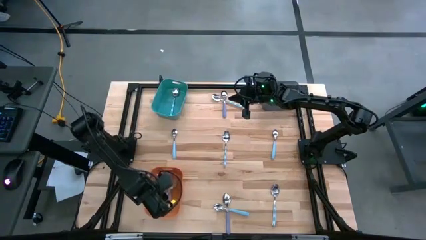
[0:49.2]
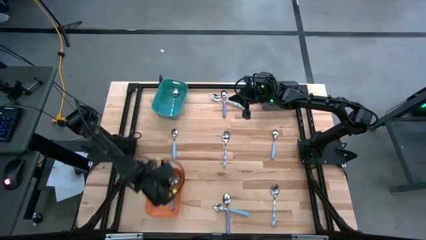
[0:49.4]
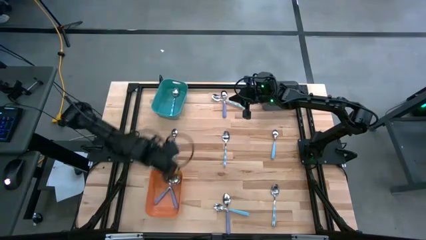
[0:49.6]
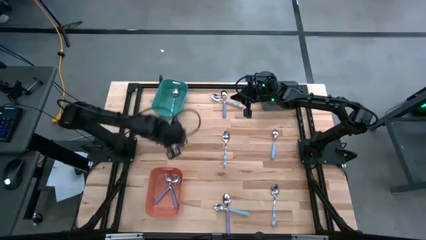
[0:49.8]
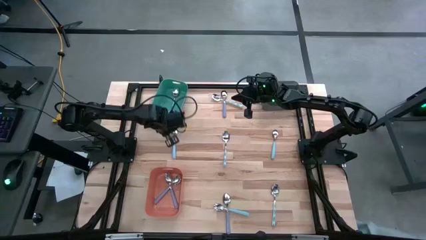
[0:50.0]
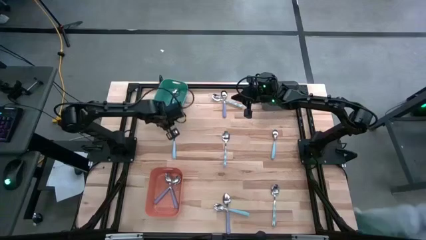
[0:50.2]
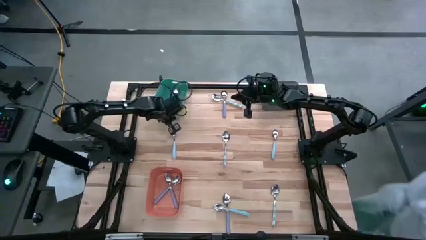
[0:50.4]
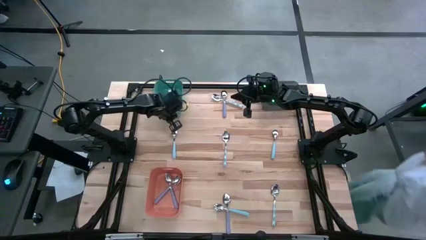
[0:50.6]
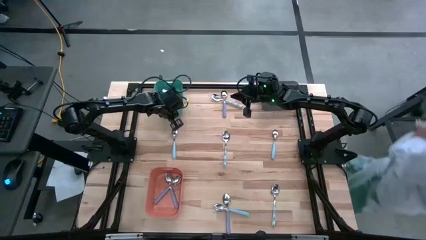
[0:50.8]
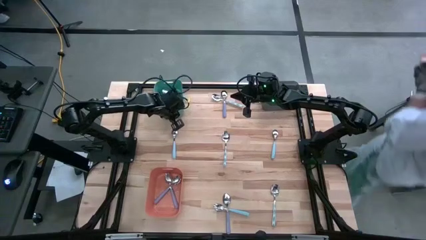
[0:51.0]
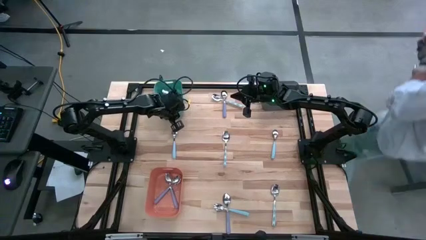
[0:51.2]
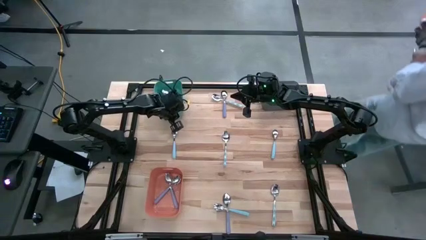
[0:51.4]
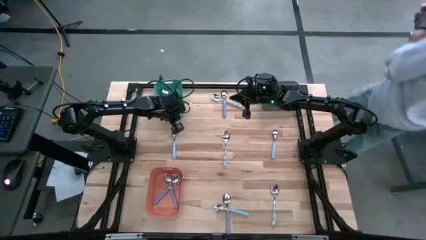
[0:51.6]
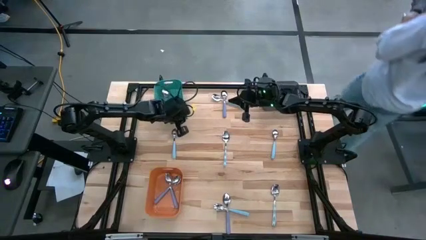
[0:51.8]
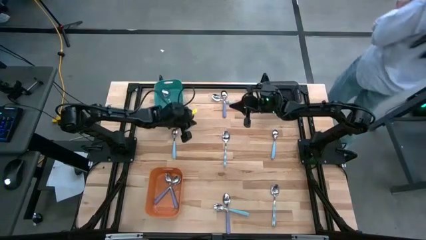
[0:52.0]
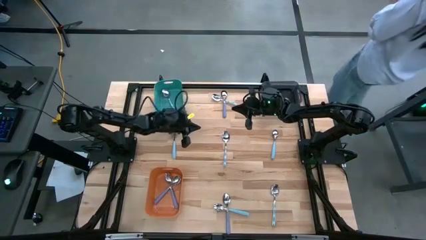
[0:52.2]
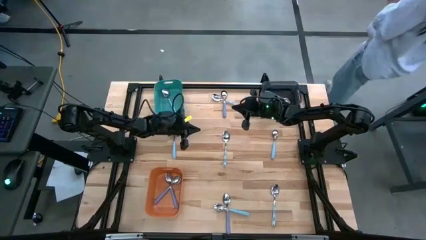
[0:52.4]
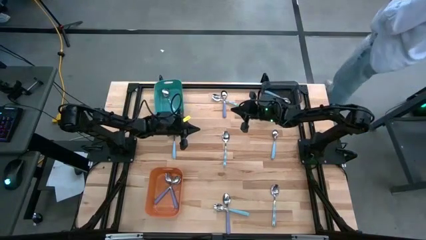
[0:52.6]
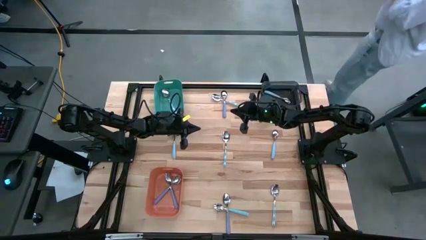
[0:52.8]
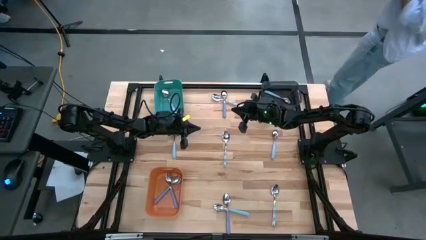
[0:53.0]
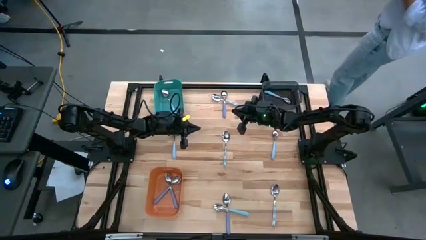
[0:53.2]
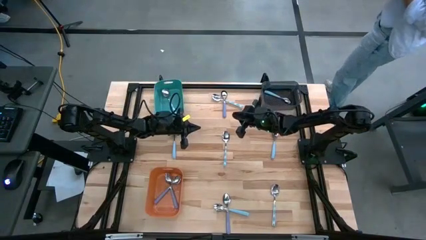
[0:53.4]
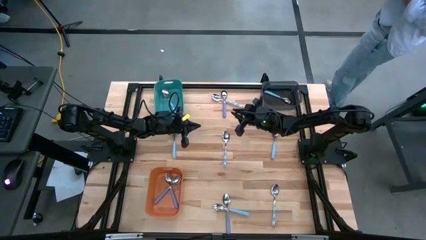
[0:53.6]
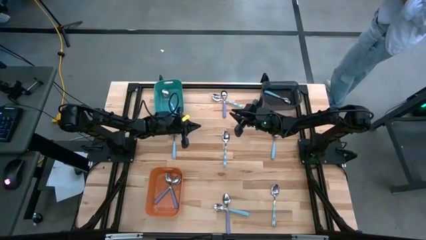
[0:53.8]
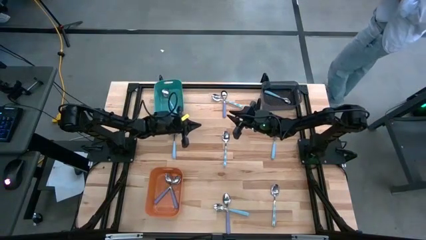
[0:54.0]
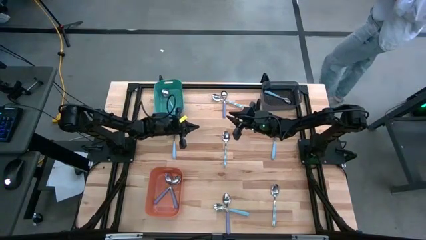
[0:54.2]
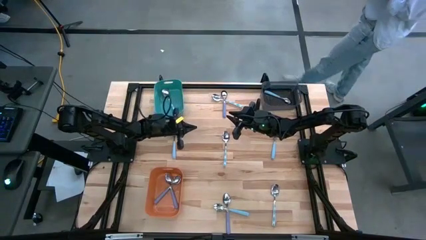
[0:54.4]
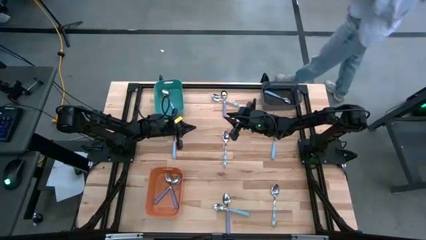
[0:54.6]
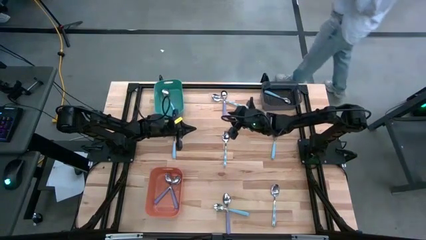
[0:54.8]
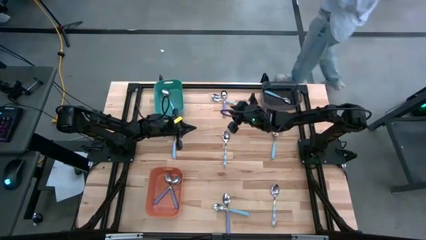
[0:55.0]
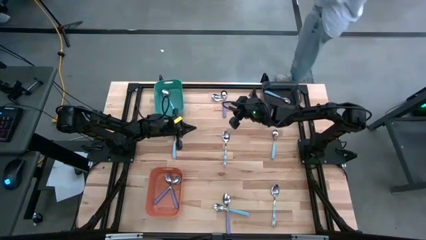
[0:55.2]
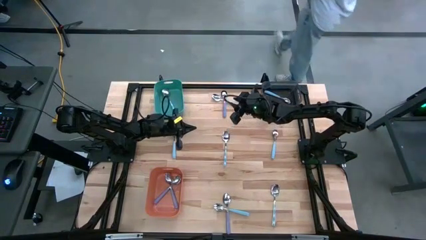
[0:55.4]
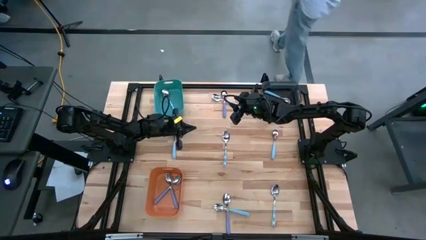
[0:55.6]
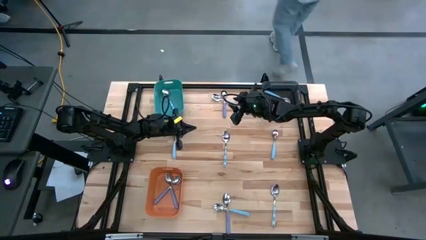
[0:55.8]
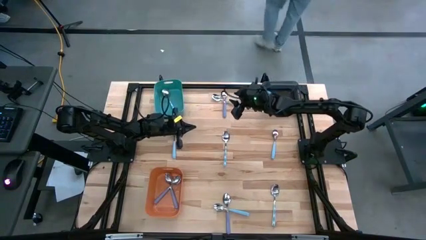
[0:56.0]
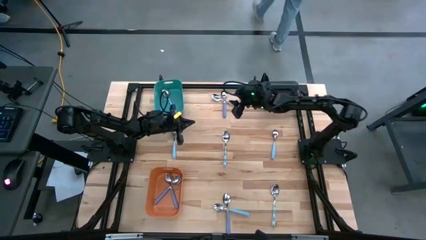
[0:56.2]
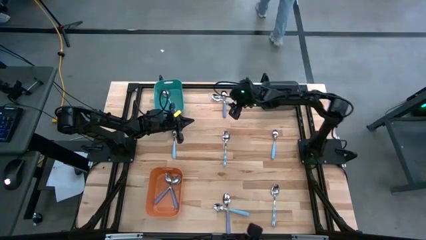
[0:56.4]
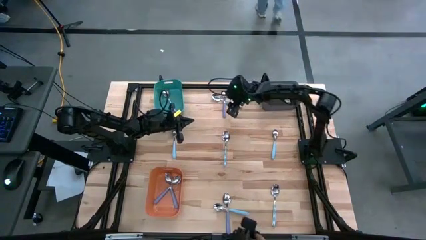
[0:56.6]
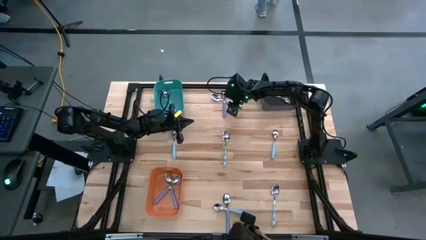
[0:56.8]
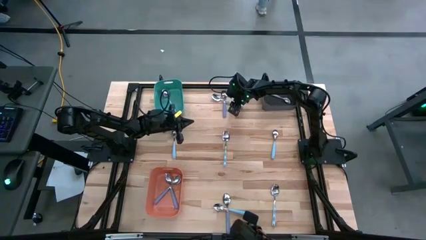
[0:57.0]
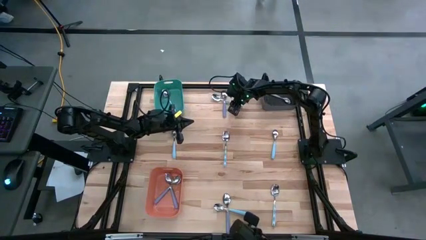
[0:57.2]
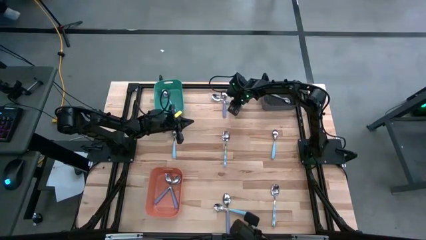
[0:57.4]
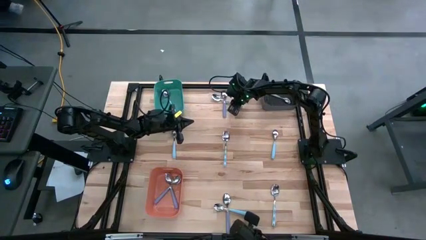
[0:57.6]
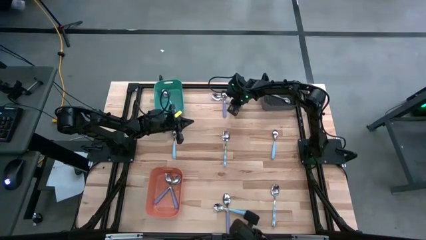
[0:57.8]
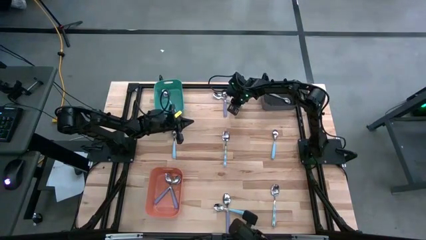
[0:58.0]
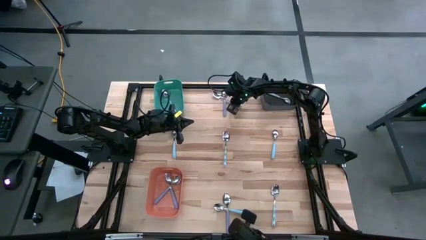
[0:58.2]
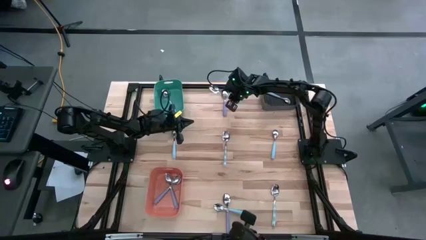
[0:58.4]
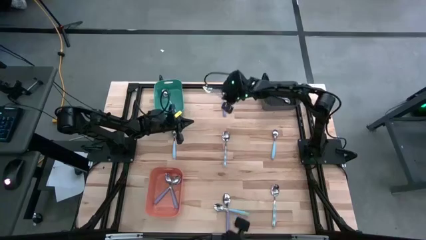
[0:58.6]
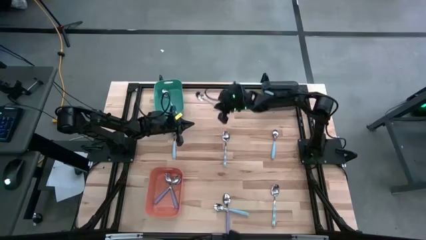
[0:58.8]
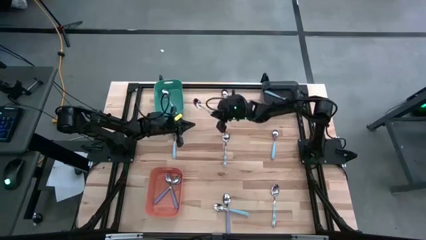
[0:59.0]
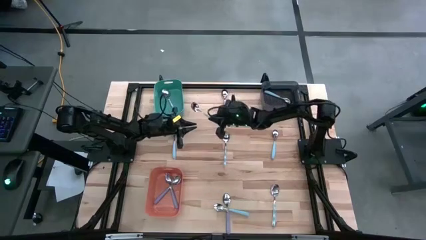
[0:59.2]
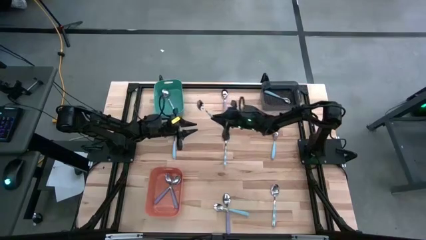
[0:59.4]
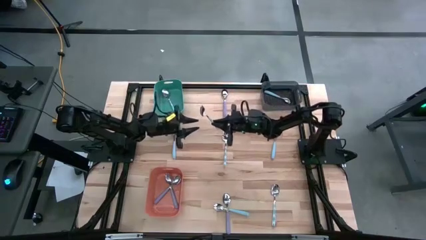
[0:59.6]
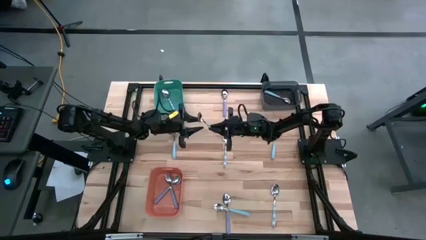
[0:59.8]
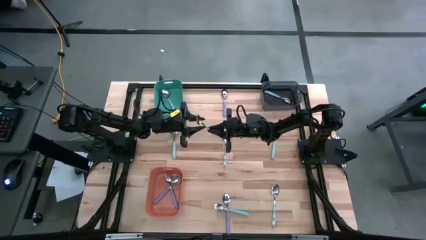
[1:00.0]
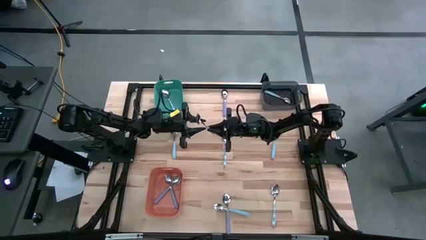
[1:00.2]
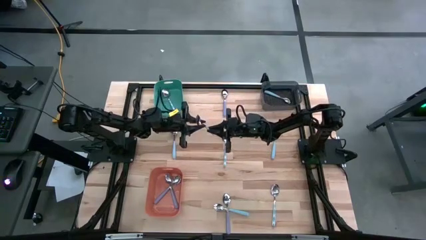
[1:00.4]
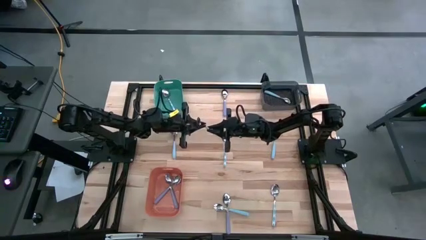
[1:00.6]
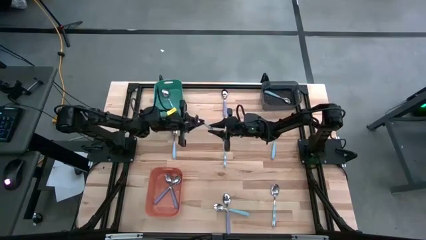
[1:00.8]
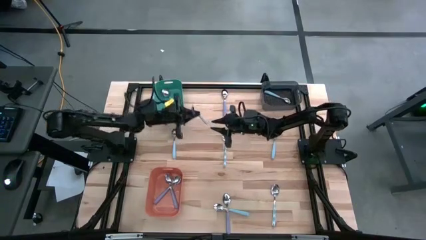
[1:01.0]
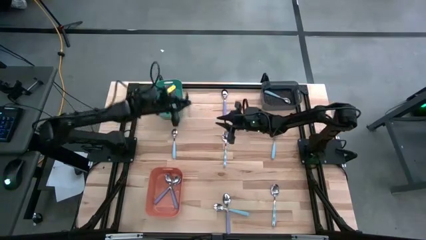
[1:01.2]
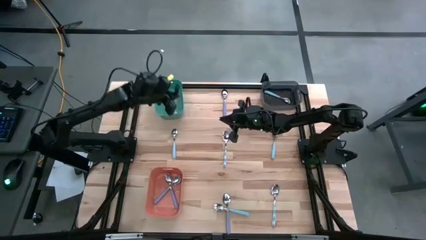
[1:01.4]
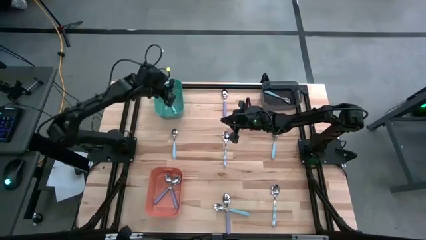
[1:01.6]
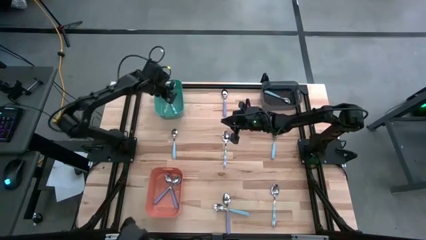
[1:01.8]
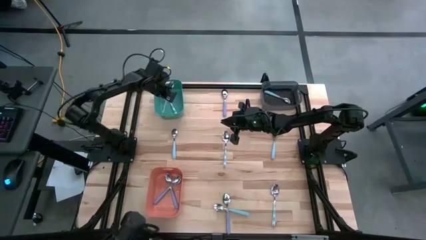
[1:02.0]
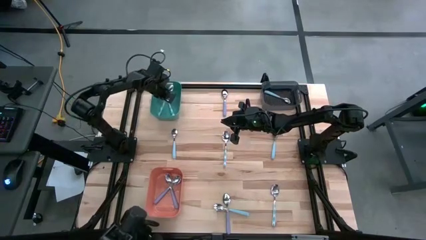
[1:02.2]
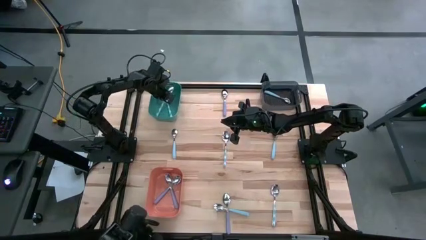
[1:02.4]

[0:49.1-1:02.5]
Task: Sort silverware by color (type)
Put the blue spoon into the green bin

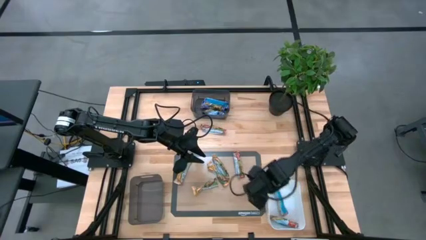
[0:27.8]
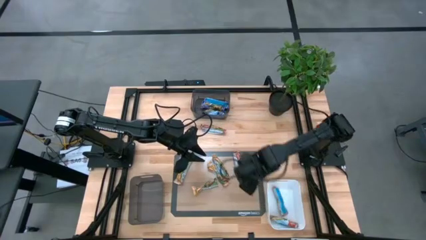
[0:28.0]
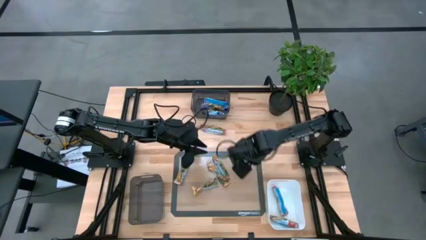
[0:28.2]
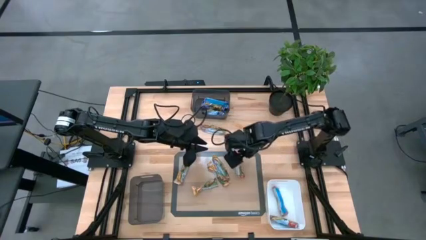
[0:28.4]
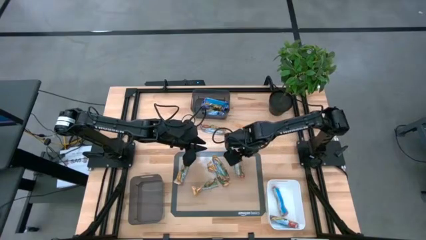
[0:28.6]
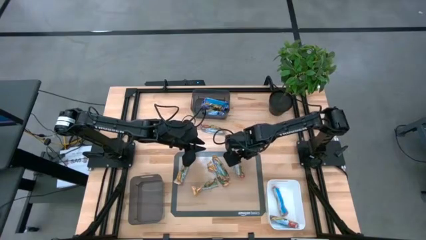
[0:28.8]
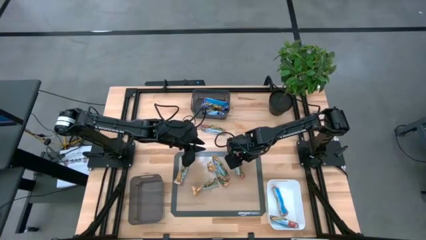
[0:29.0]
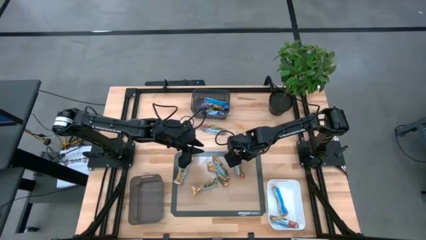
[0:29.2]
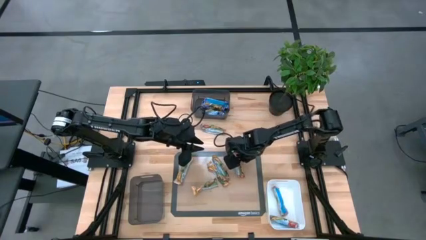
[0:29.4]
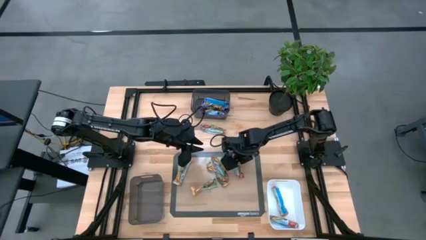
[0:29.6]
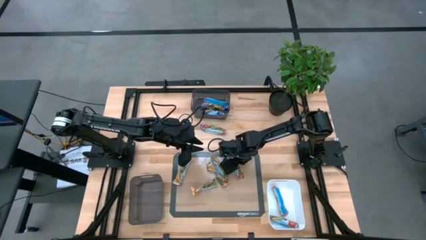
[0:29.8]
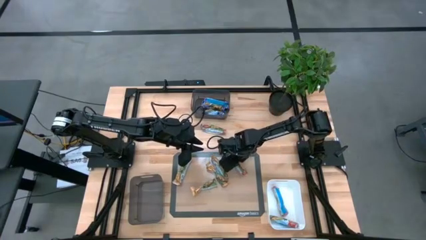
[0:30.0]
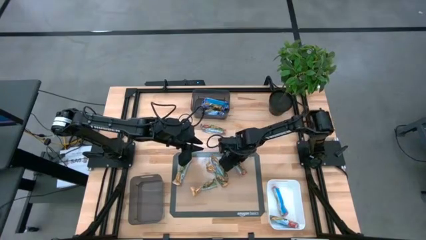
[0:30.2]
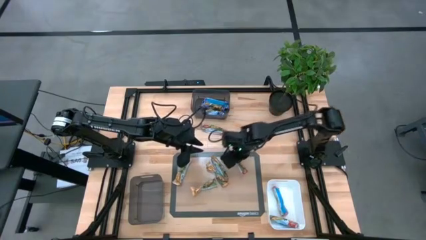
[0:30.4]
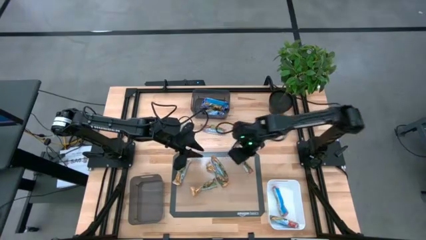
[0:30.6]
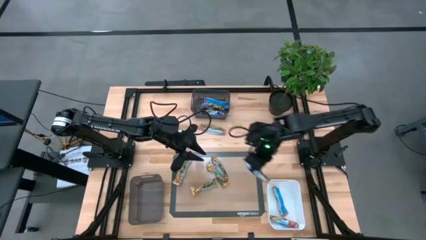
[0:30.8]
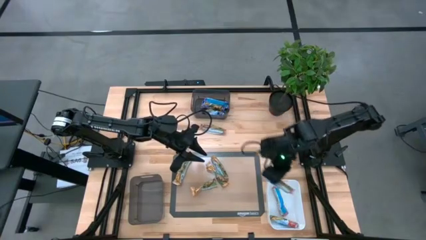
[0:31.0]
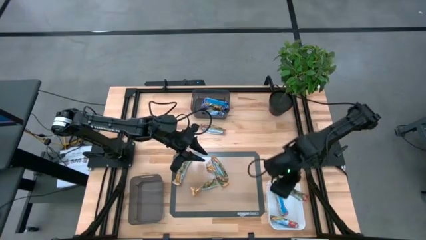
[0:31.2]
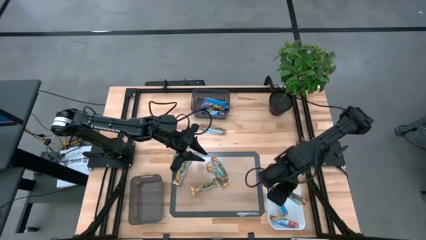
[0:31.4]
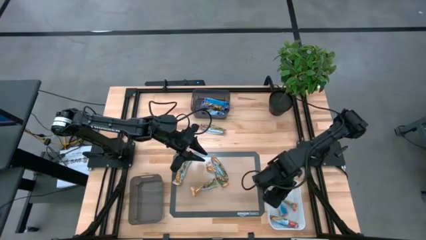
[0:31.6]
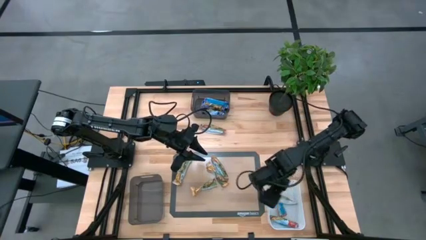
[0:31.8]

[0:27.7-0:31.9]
Task: Pick and place Granola Bars by type
Put the bottom right red snack bar into the white bin
